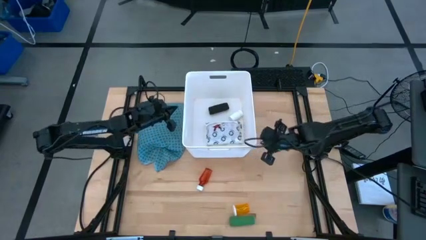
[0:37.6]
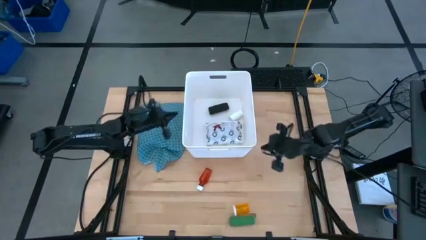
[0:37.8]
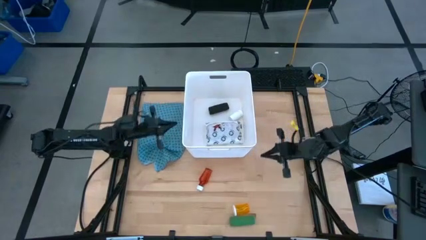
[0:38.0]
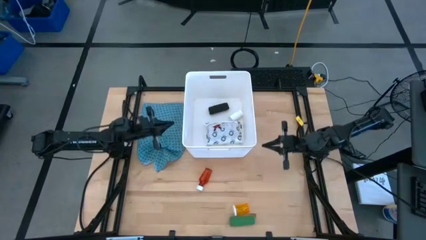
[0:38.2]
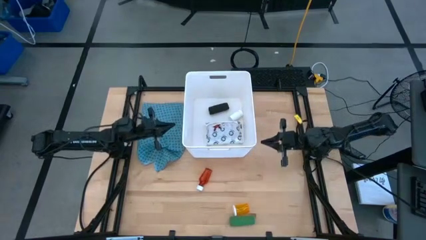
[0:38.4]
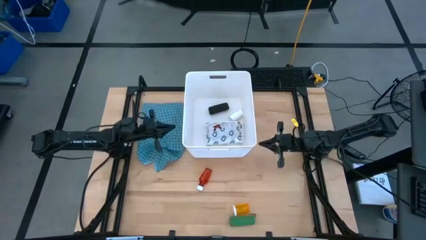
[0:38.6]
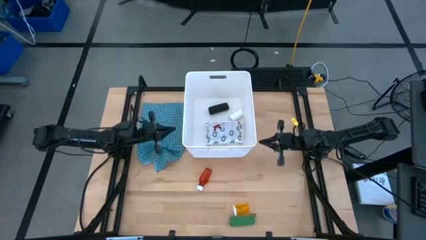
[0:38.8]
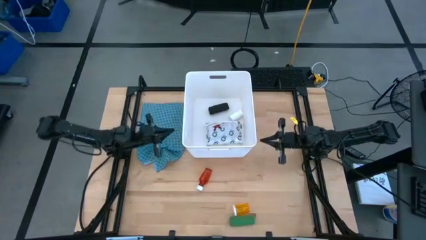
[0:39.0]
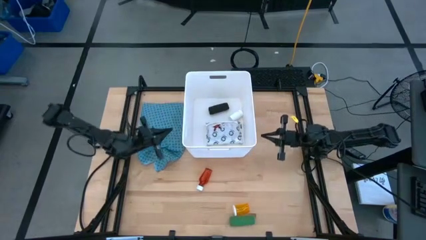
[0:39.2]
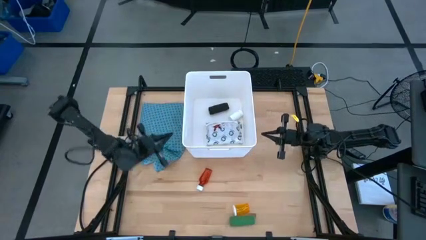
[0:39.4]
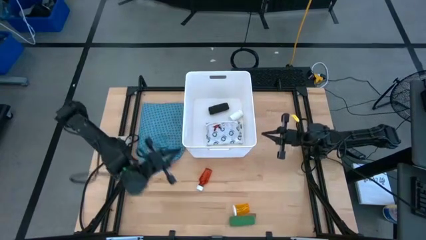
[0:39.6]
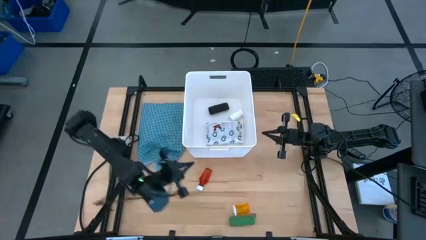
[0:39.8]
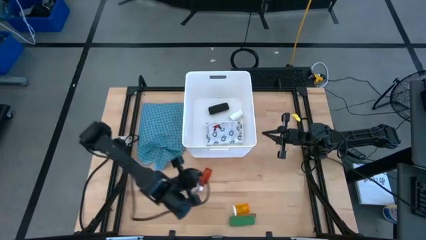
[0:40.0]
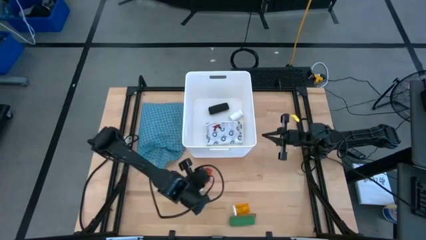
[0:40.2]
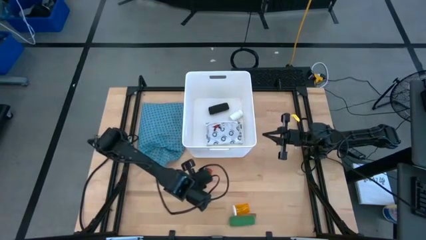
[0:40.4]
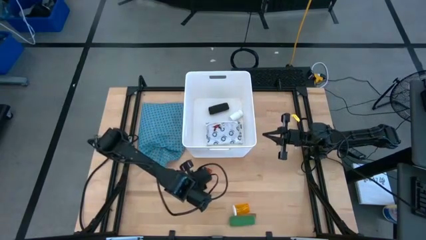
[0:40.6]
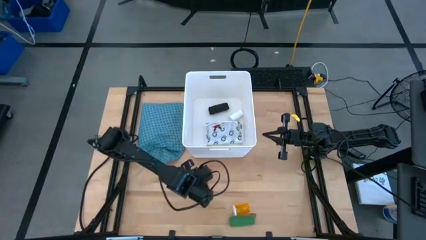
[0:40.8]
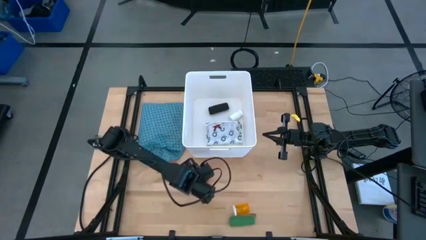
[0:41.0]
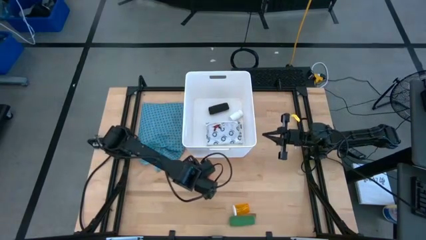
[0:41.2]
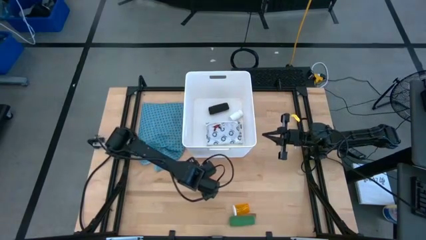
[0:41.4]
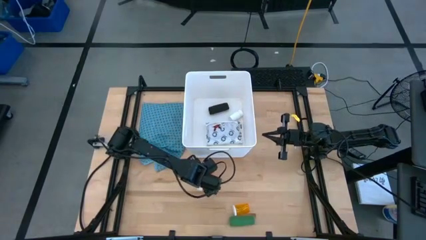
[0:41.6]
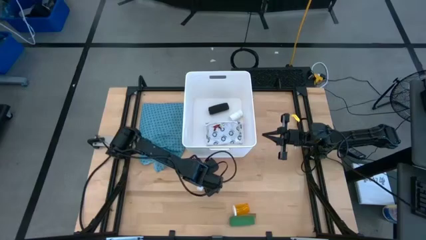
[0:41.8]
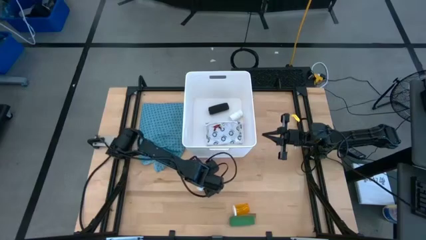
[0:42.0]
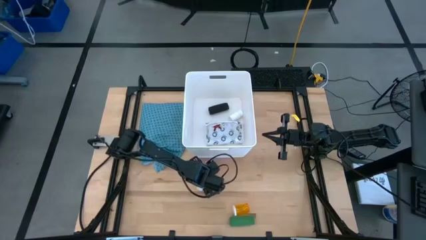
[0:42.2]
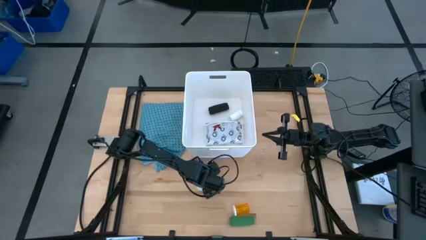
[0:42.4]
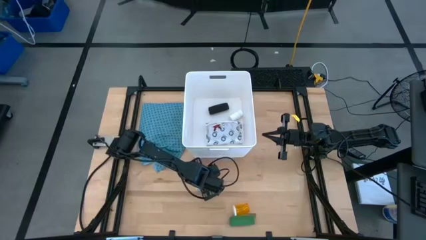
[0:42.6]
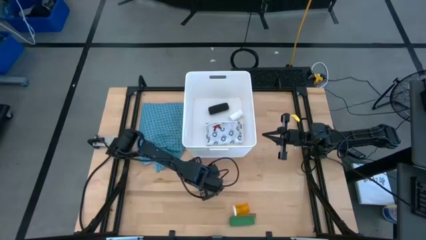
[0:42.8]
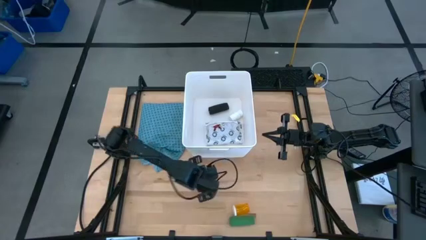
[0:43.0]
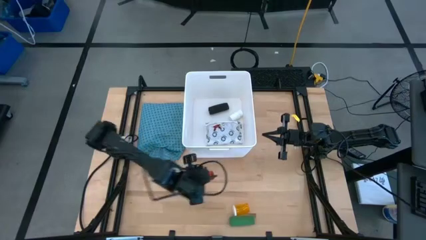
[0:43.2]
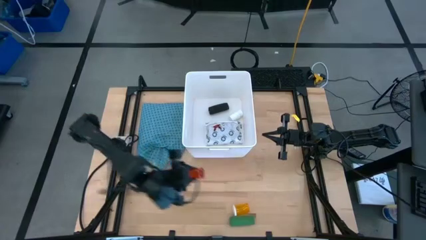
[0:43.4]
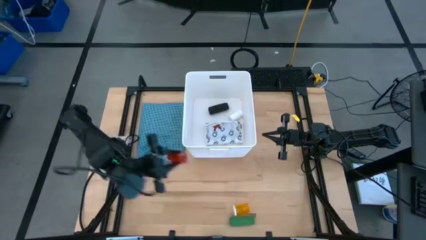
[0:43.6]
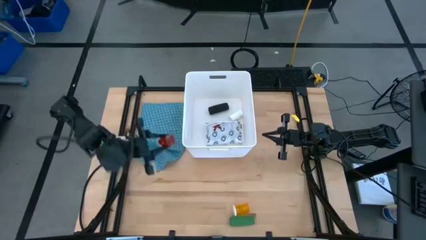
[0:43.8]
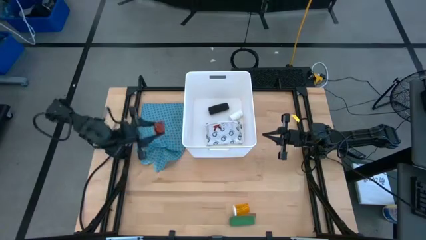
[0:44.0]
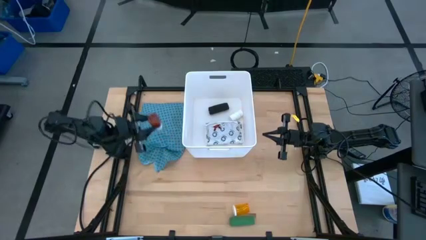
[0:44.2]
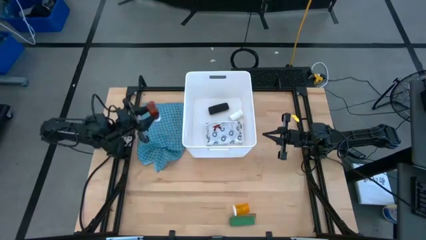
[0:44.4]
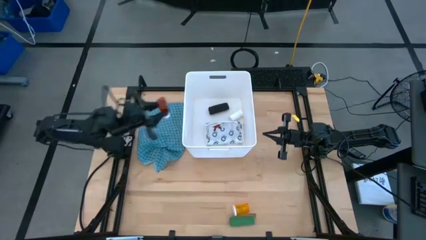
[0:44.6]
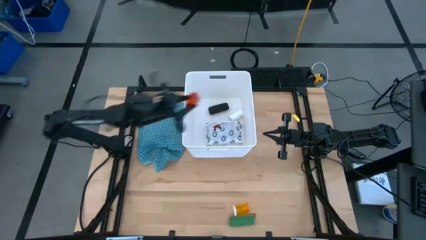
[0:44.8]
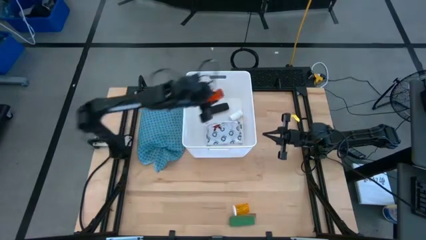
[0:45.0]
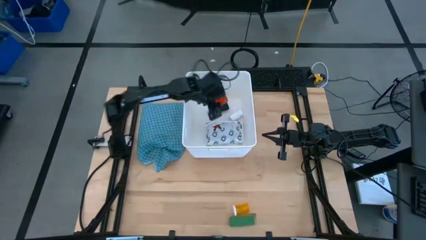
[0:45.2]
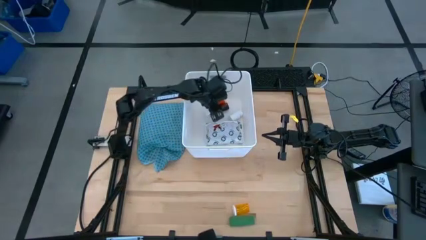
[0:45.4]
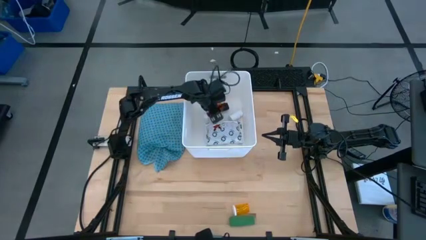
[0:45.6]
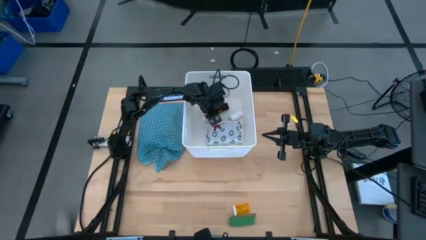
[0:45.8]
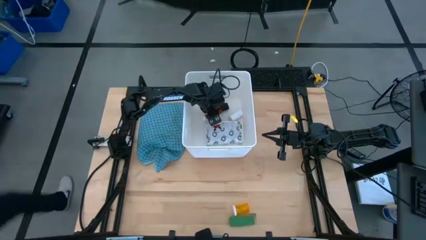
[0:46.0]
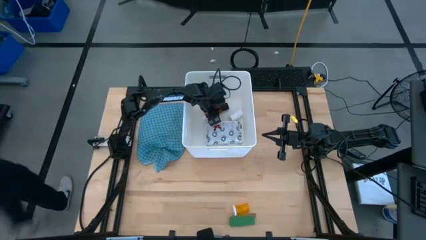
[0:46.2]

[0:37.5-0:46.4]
Task: Pick & place medical supplies in basket/bin
Put the red pill bottle into the white bin

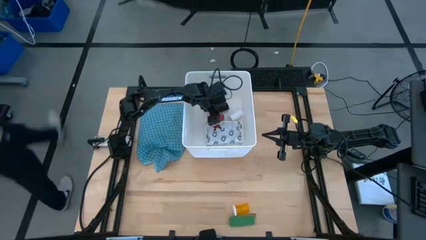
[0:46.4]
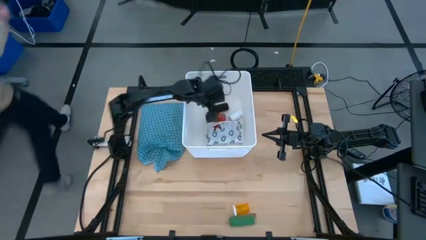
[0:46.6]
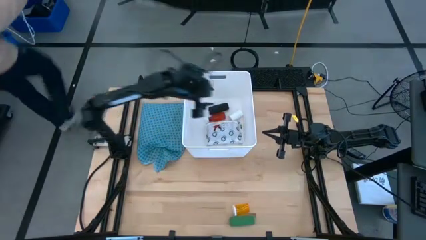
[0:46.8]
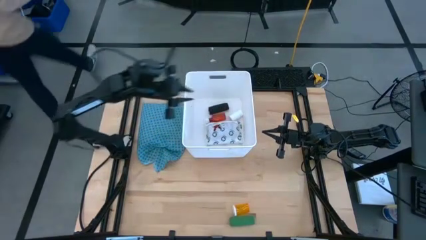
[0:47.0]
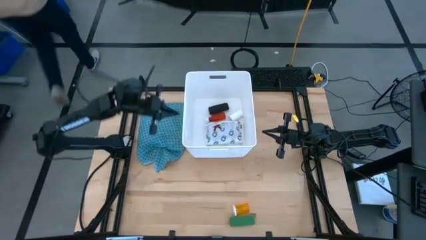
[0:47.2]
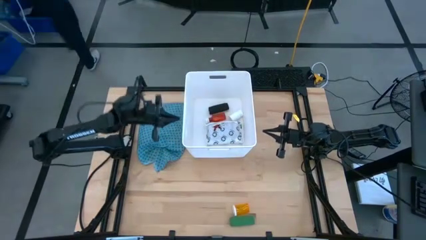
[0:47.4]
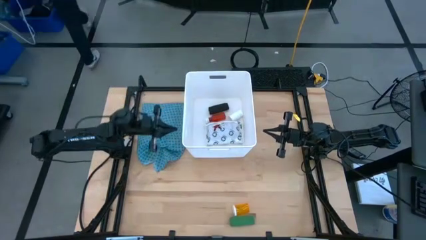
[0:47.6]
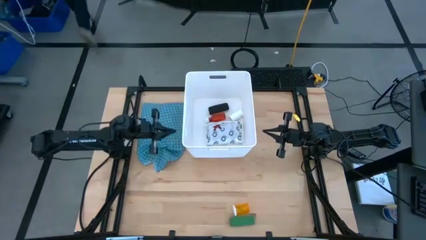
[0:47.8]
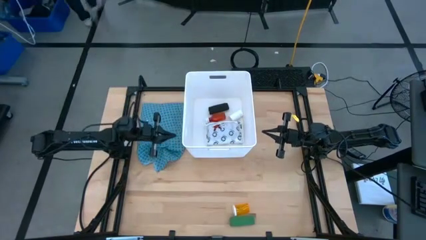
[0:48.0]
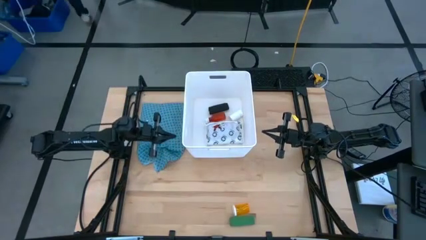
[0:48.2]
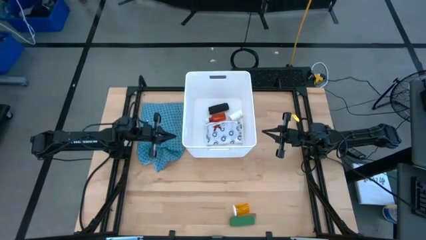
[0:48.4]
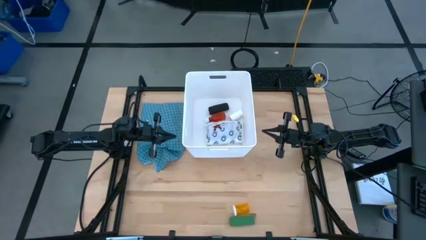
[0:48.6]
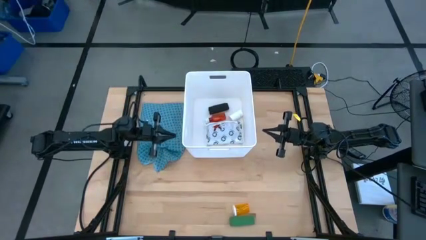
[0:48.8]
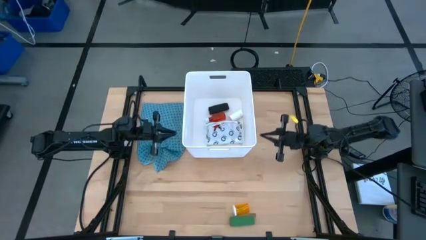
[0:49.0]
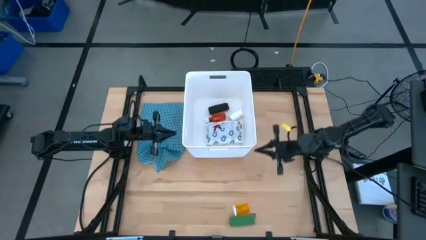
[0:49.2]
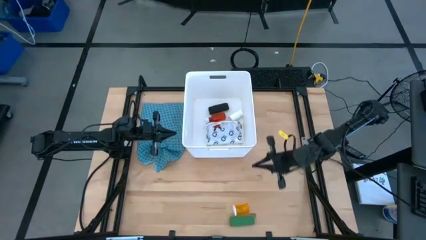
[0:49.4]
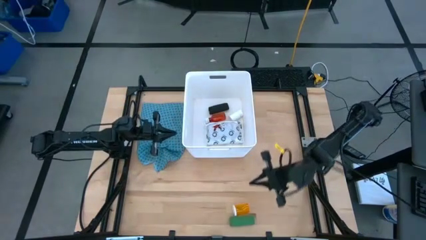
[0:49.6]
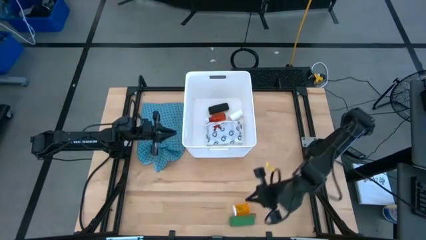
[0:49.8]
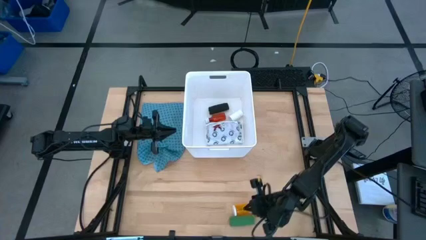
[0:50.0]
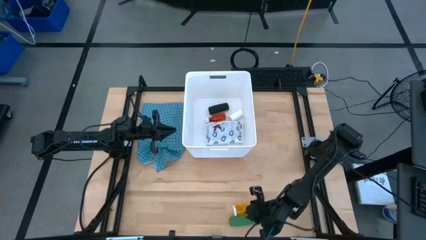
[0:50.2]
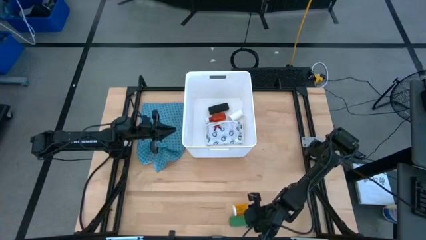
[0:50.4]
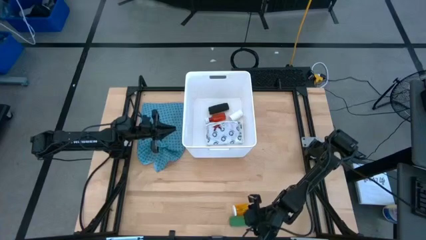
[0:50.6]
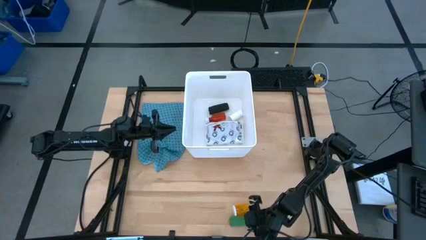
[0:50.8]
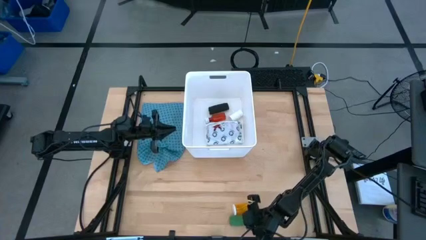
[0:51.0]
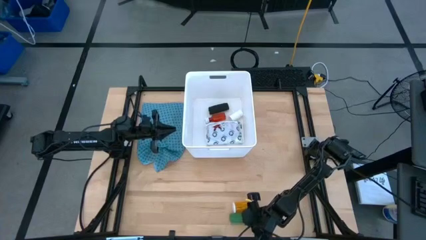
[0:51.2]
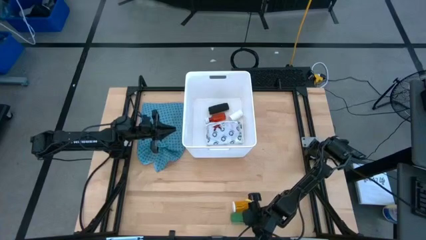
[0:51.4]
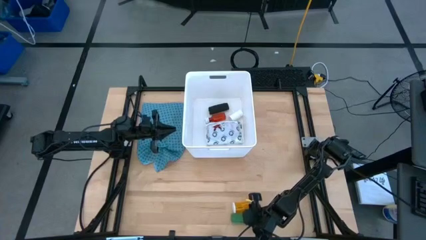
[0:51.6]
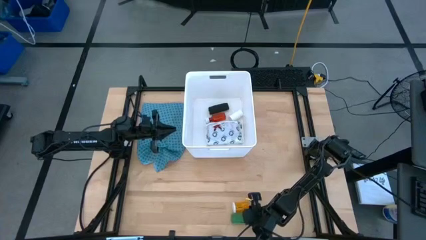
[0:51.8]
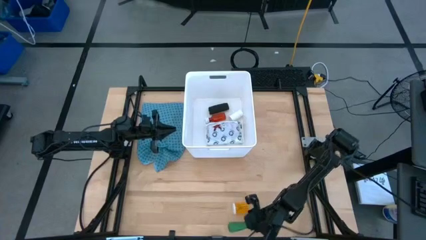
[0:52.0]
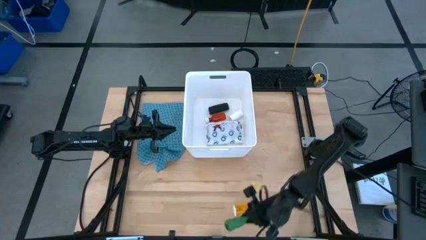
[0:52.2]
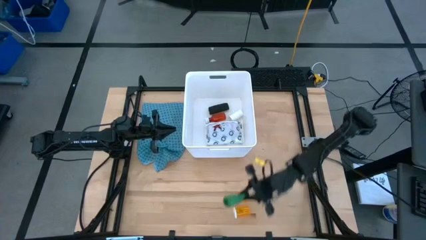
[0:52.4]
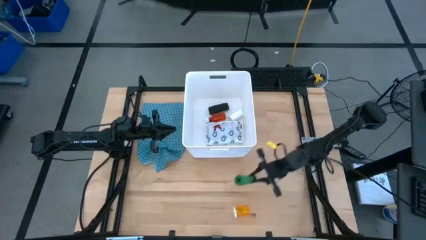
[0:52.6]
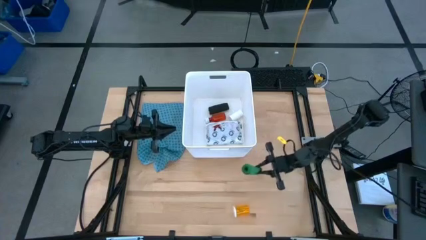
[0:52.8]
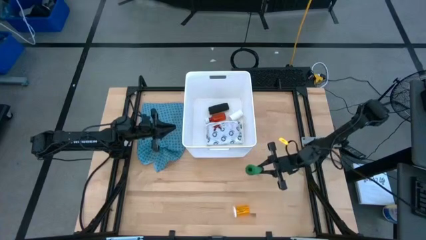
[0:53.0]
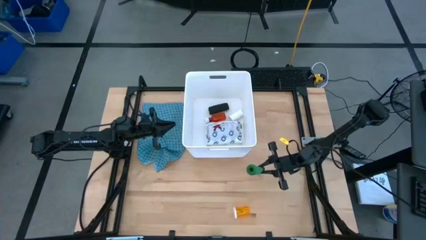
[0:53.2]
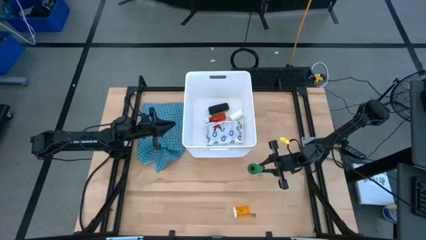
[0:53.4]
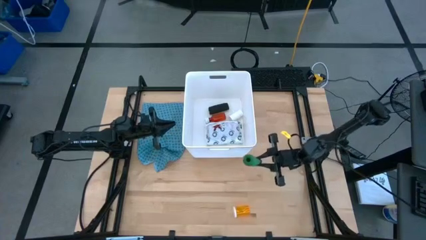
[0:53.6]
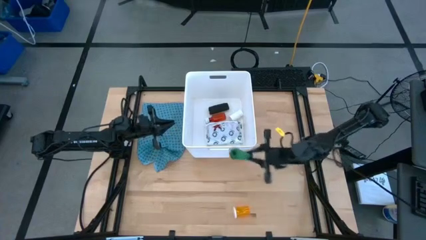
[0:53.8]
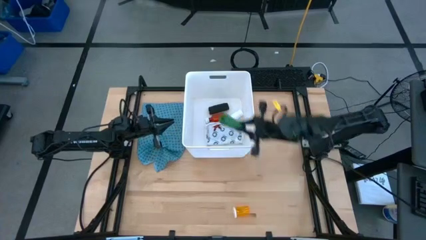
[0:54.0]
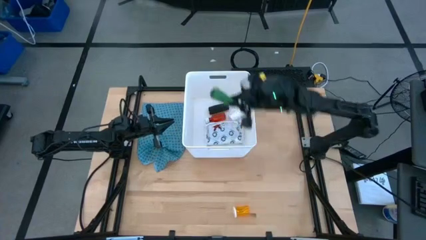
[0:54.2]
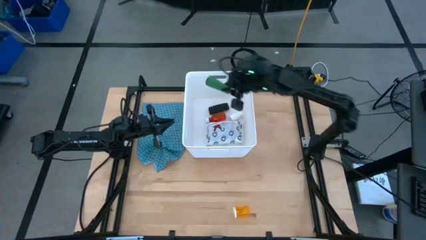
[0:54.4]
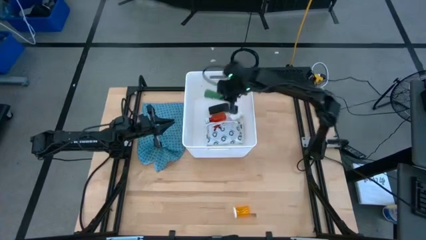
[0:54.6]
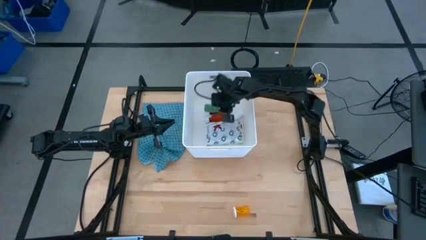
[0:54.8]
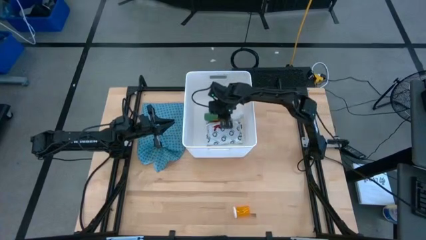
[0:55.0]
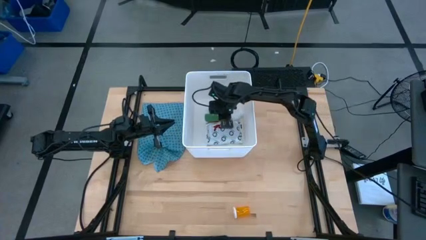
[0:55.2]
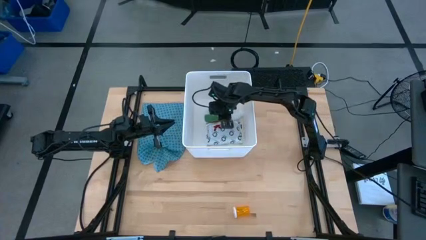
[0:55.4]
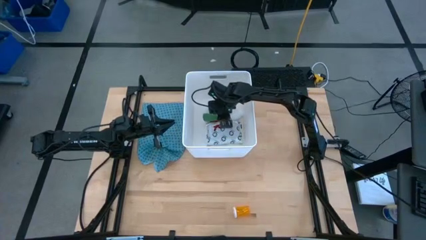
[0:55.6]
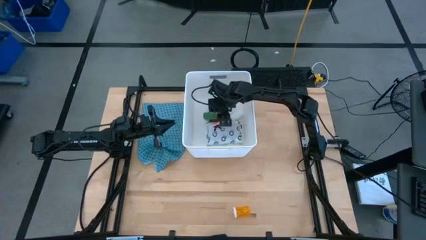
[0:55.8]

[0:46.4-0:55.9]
Put the green bandage into the white bin
